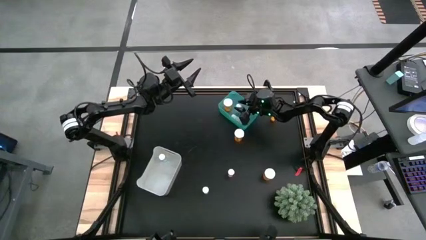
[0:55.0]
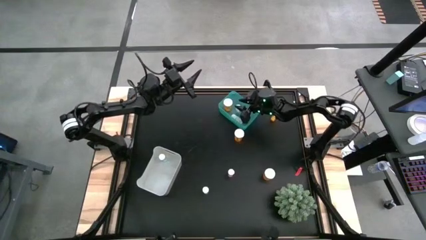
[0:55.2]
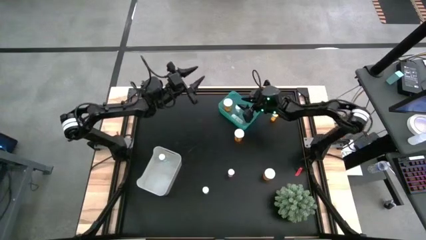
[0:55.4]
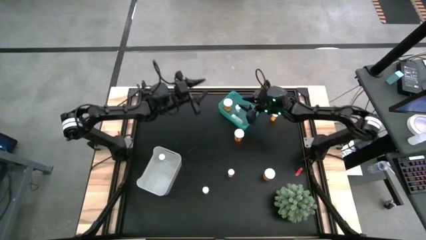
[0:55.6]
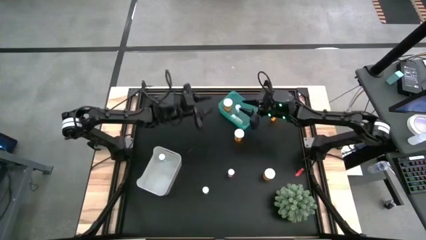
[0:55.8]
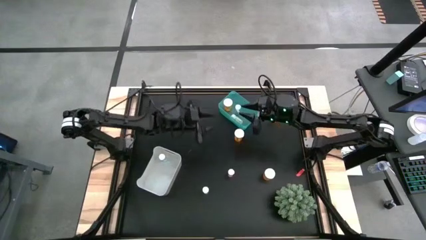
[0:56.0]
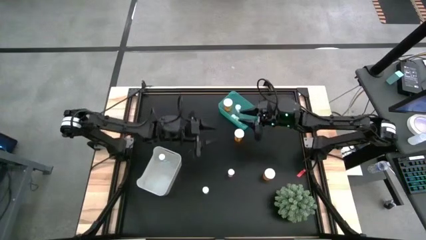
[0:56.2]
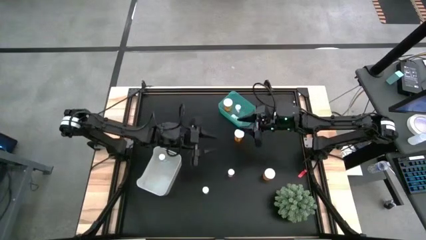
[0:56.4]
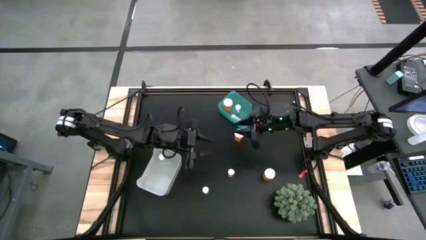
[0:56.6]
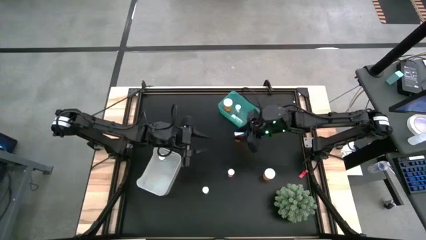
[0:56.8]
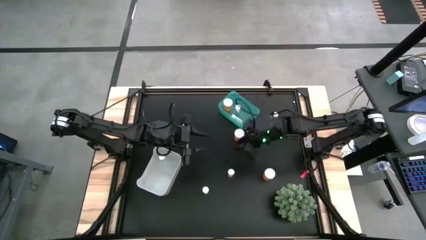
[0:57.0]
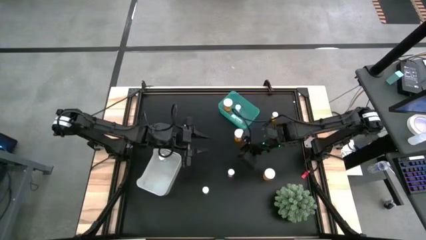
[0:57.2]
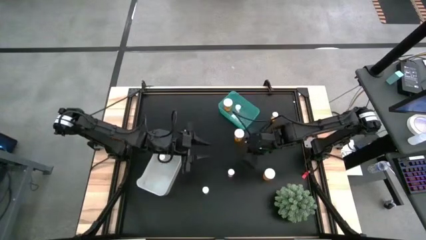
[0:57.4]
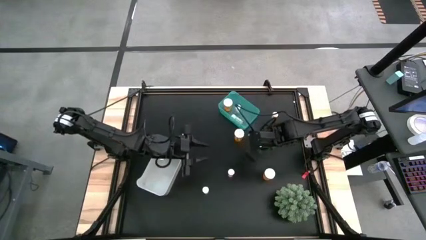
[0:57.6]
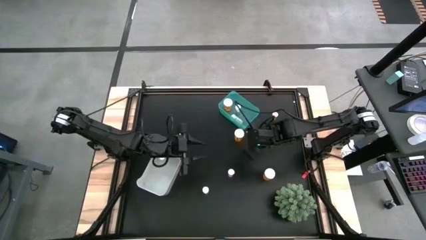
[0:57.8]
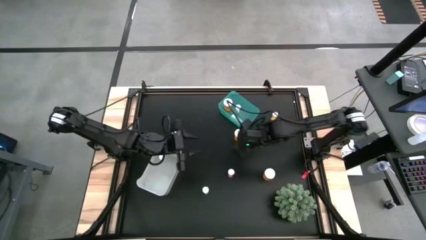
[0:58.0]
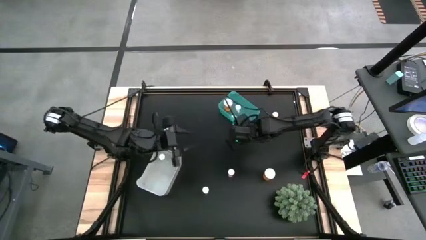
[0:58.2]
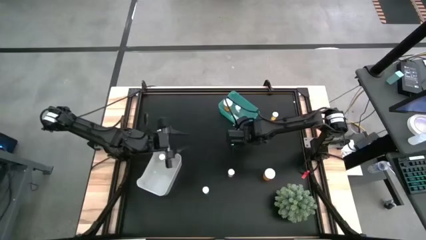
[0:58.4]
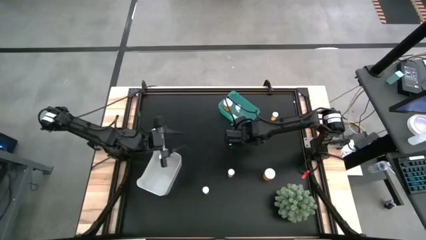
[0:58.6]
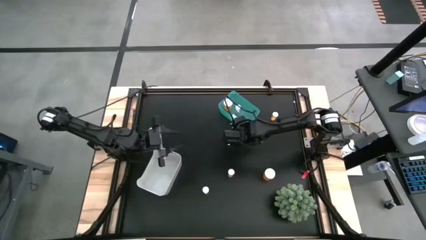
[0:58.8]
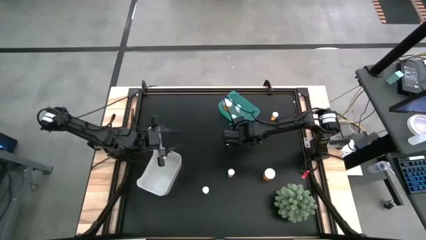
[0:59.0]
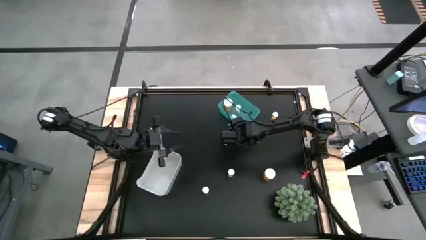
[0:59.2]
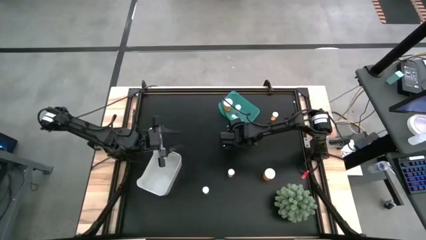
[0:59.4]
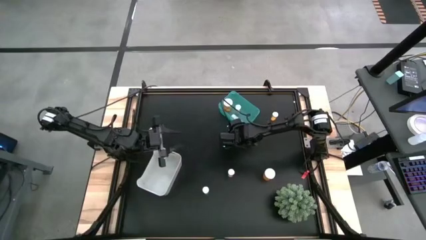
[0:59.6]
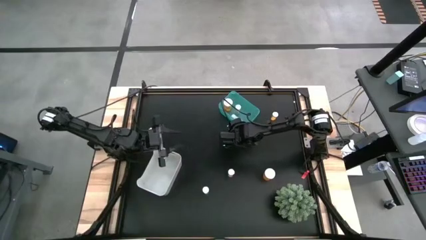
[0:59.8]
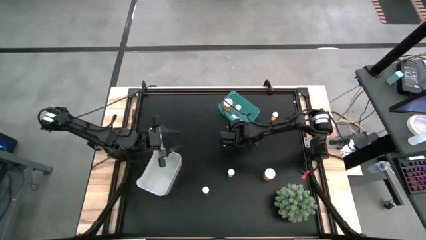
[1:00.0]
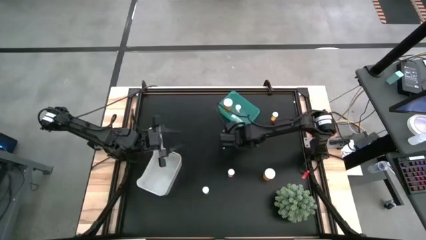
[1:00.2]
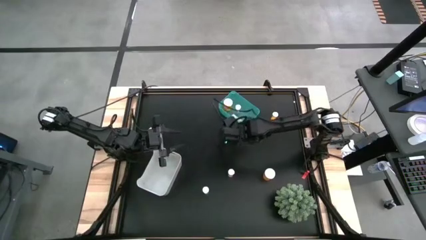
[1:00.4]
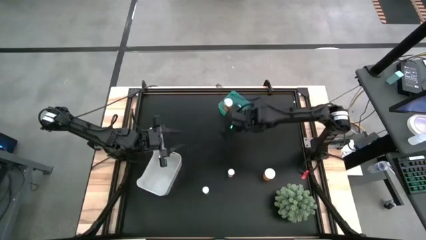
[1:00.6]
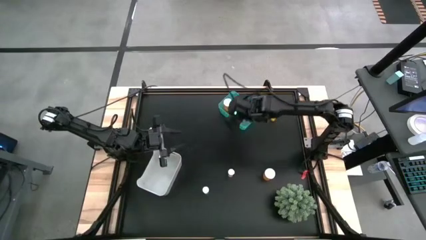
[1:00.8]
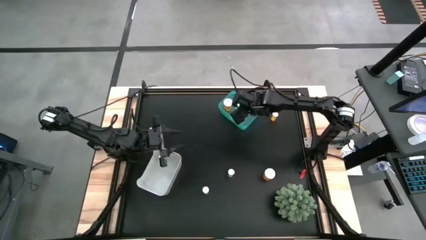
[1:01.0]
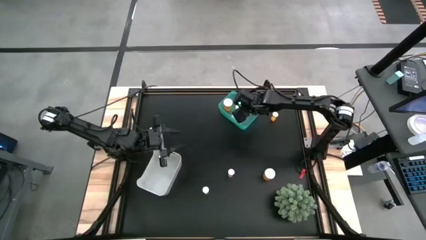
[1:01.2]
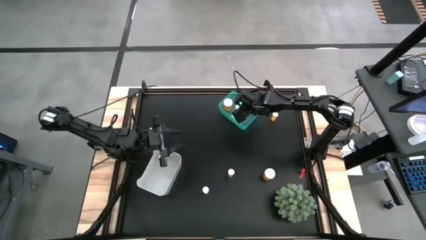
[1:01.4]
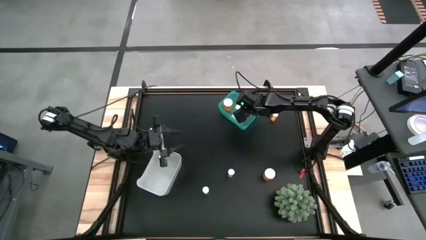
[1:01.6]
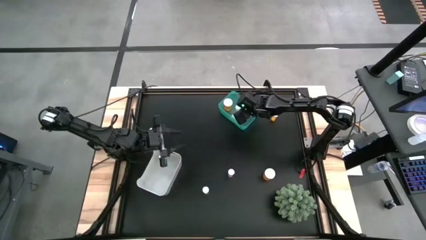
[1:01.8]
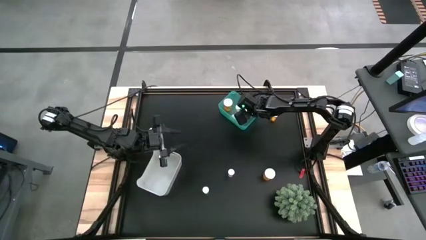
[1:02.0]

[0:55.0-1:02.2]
Task: Pick and place medicine bottles into bin by pill shape (circle, oval)
Put the top orange capsule bottle into the blue bin

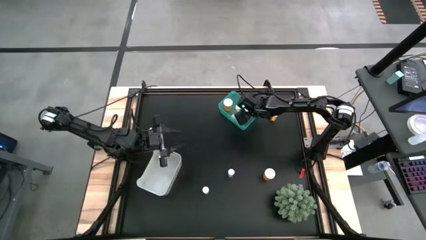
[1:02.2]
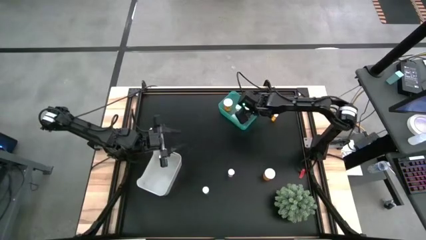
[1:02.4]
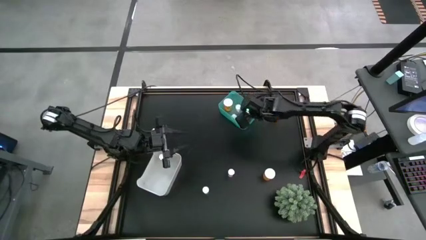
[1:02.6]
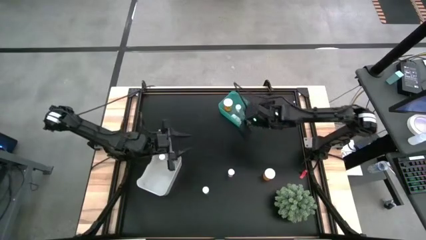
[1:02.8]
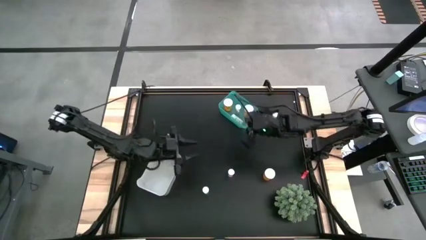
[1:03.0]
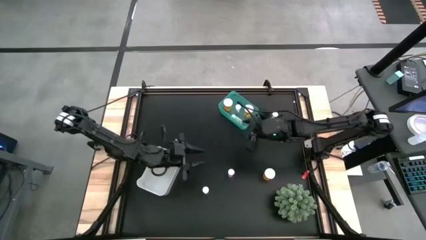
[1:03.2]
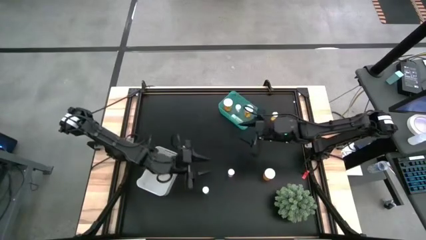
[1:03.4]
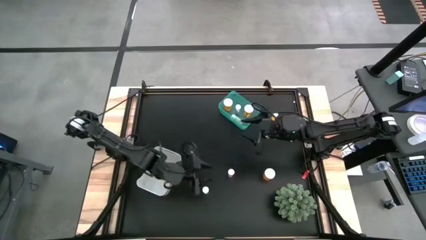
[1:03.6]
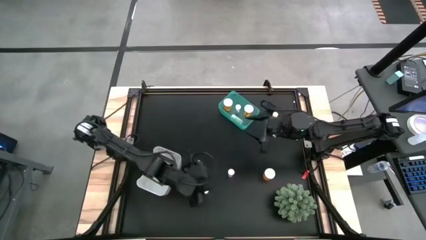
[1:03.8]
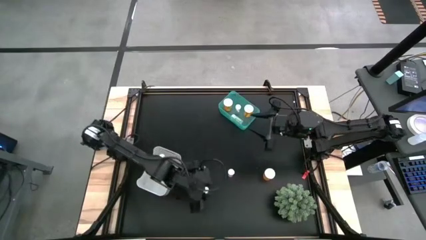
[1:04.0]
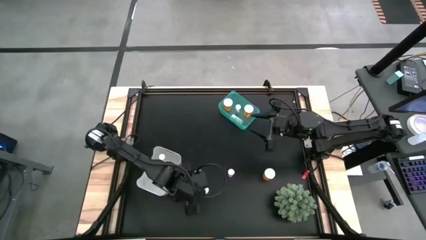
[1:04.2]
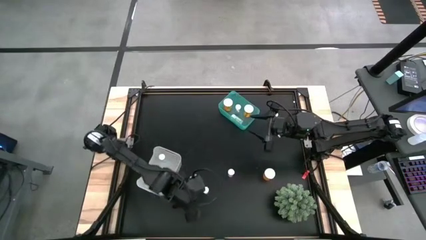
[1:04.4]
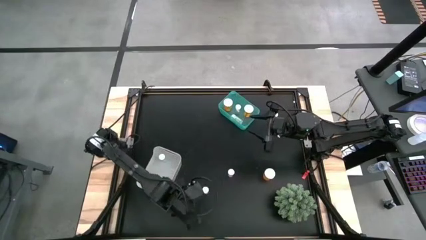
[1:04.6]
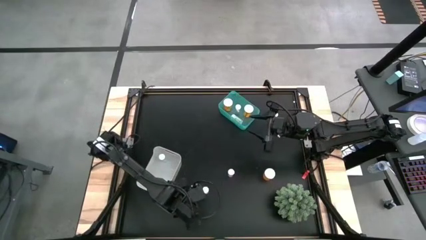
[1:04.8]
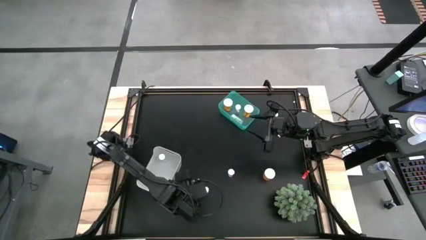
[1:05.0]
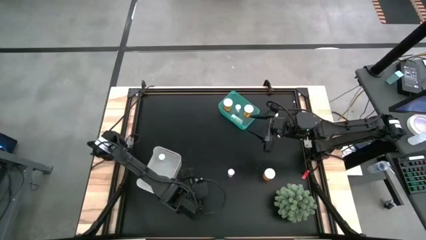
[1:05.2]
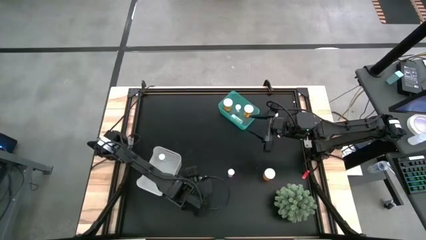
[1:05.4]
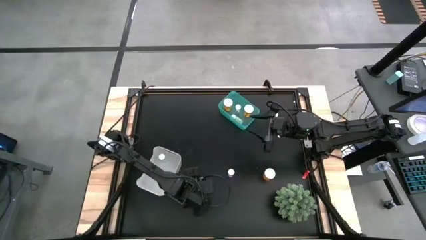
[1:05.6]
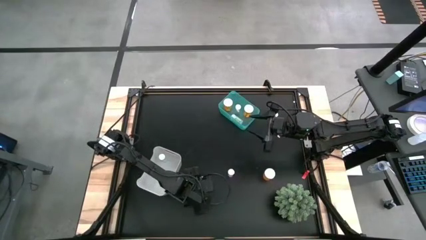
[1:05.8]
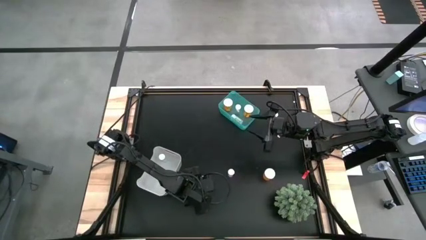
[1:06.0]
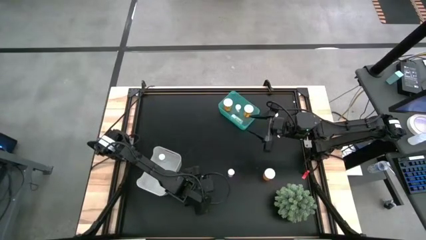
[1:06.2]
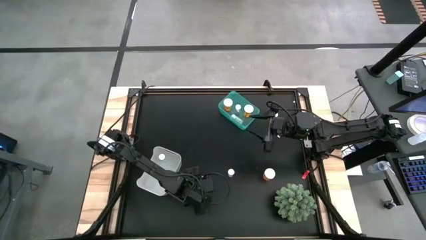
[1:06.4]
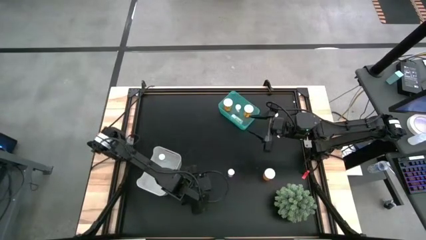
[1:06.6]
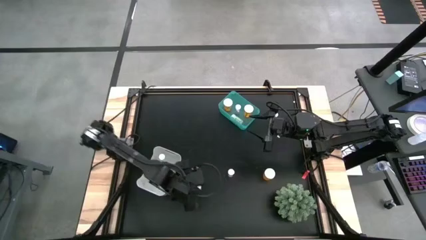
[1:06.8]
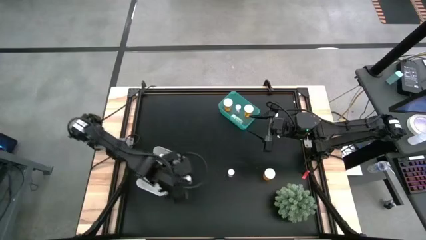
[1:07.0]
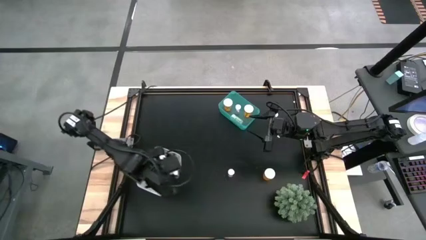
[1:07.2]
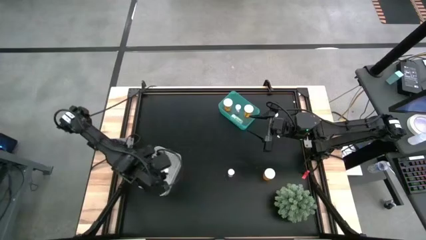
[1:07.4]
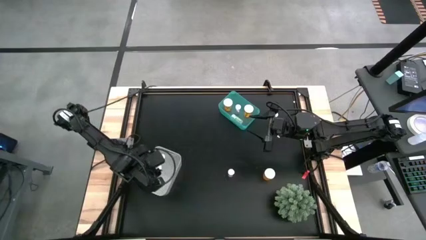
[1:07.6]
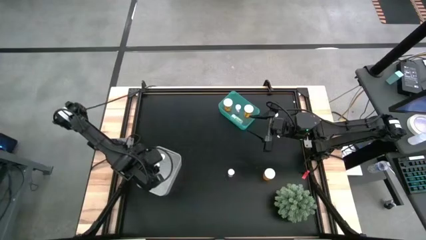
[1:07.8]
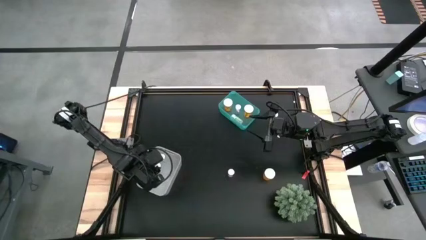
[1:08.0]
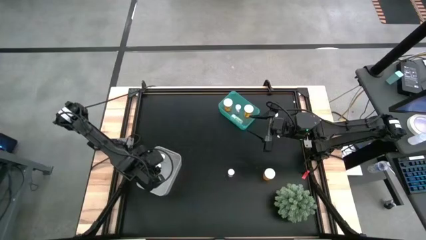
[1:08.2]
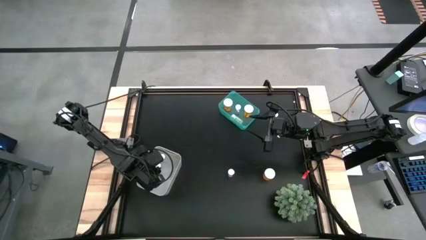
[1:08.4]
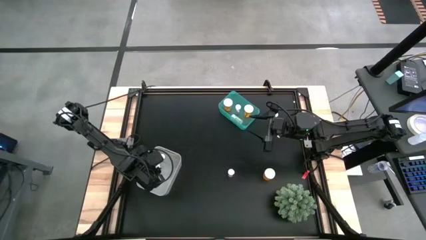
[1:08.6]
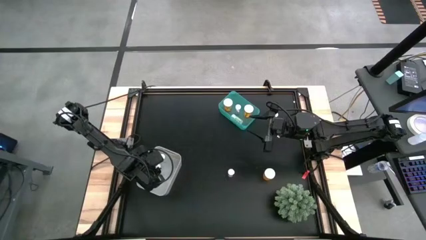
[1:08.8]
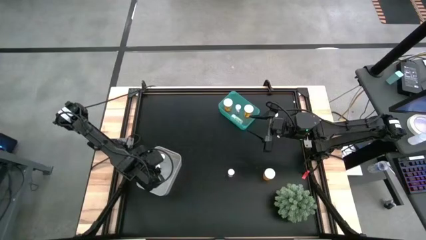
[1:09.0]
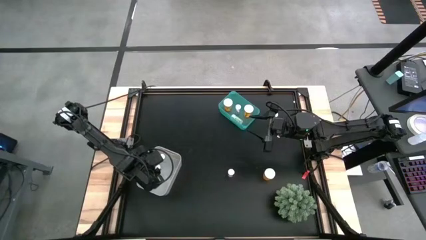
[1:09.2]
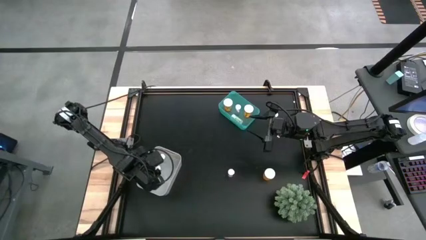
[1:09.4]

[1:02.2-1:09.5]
Put the blue tablet bottle into the gray bin
